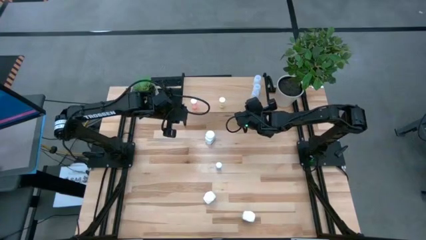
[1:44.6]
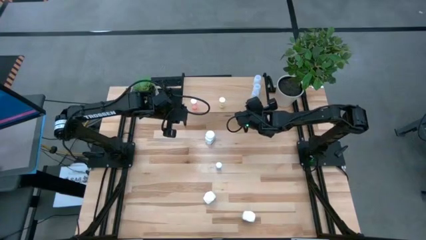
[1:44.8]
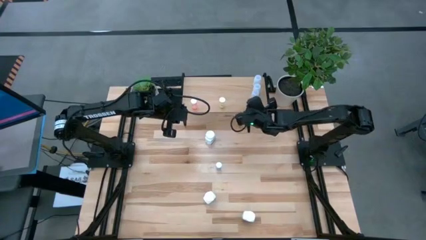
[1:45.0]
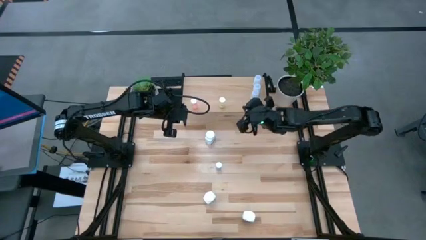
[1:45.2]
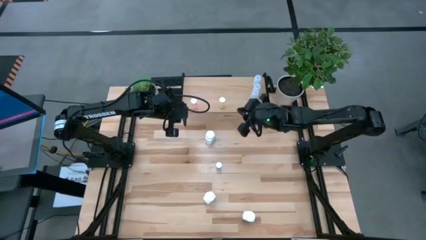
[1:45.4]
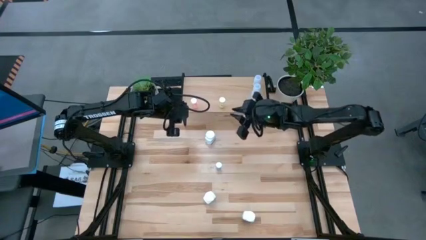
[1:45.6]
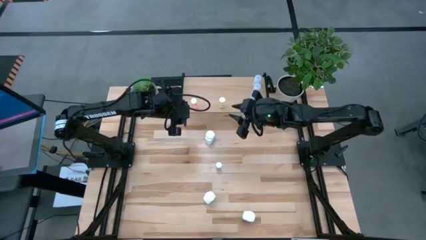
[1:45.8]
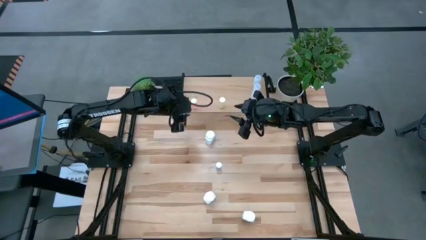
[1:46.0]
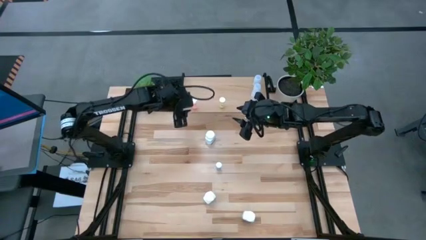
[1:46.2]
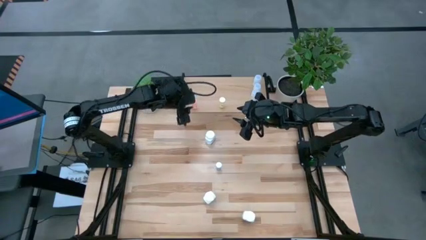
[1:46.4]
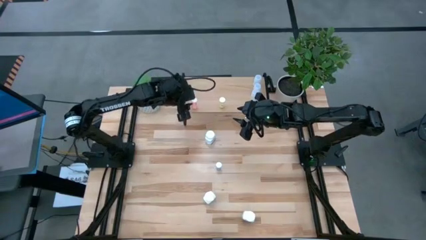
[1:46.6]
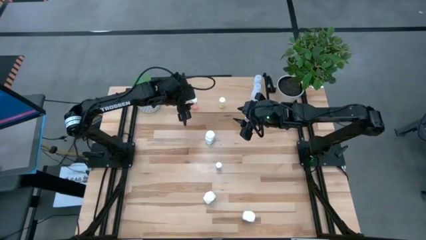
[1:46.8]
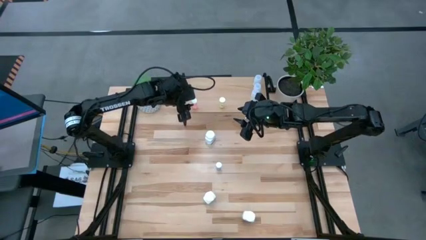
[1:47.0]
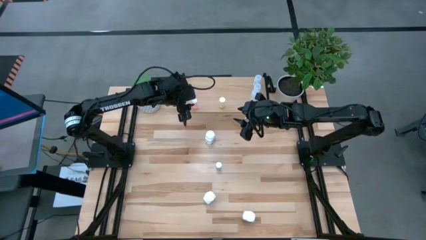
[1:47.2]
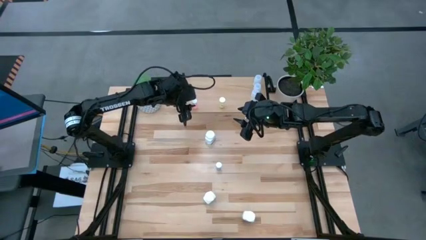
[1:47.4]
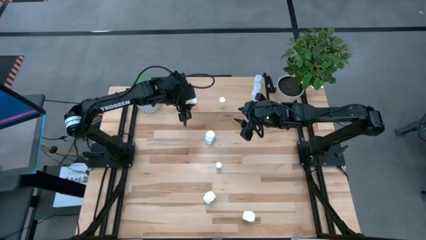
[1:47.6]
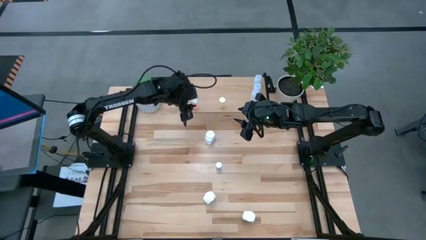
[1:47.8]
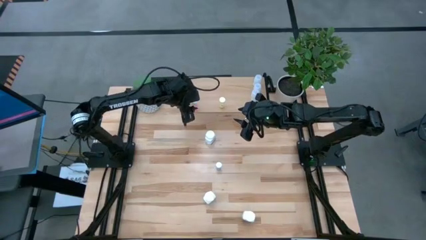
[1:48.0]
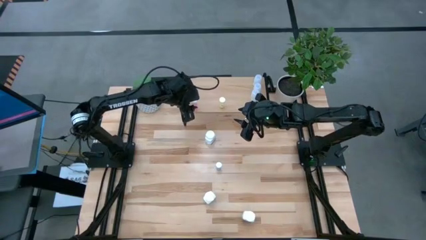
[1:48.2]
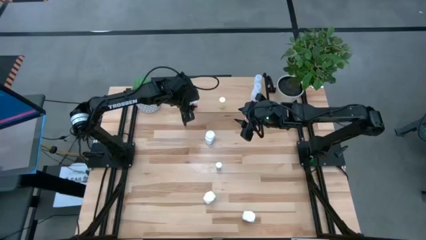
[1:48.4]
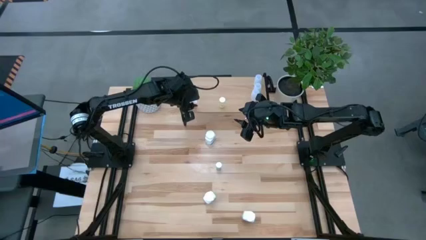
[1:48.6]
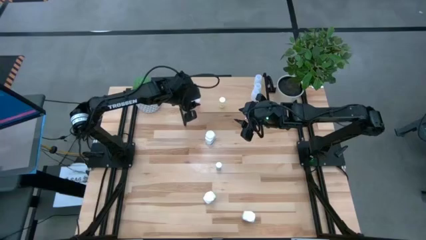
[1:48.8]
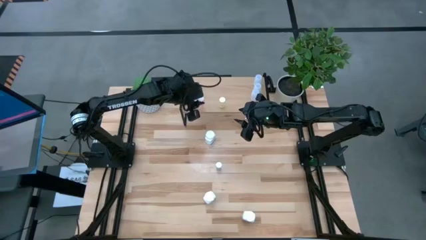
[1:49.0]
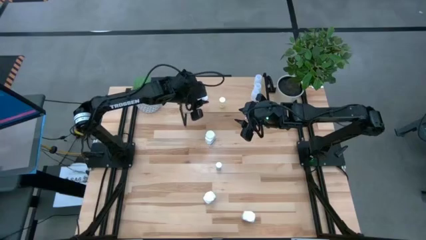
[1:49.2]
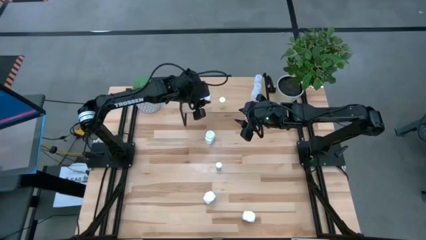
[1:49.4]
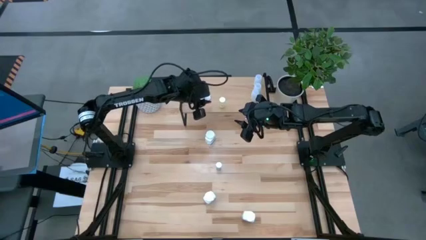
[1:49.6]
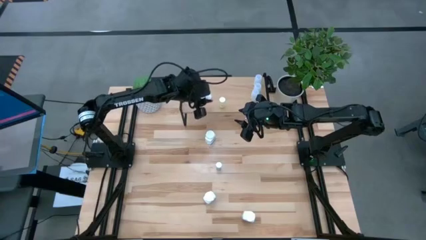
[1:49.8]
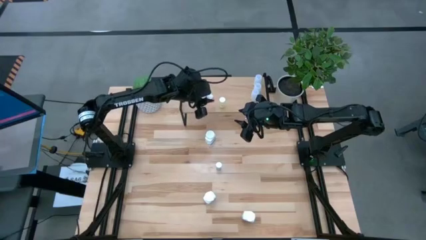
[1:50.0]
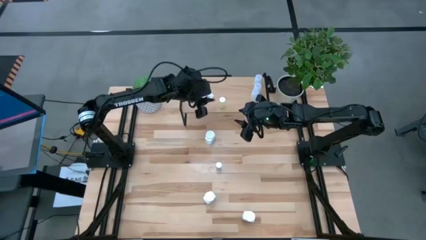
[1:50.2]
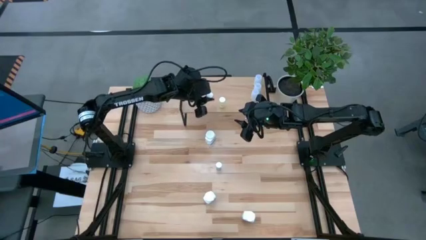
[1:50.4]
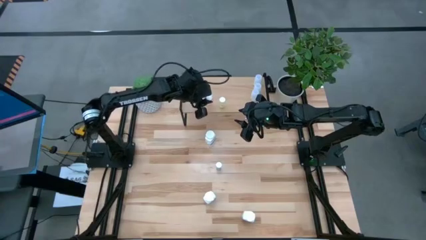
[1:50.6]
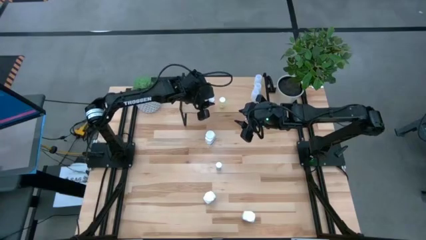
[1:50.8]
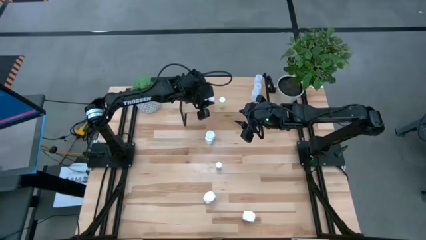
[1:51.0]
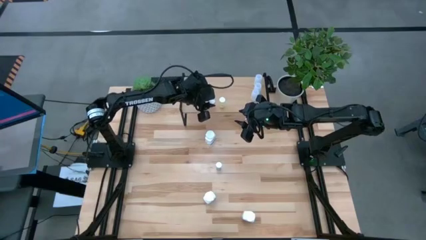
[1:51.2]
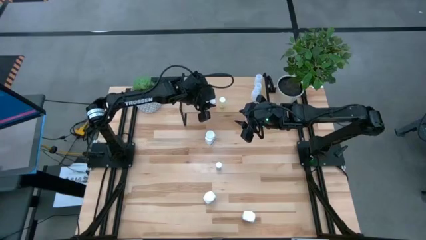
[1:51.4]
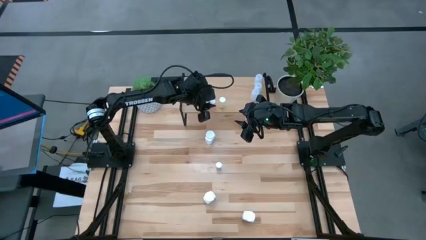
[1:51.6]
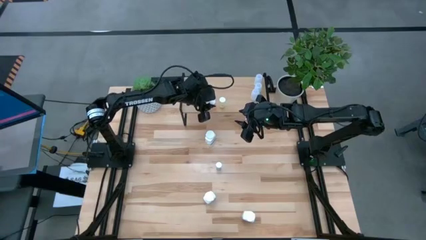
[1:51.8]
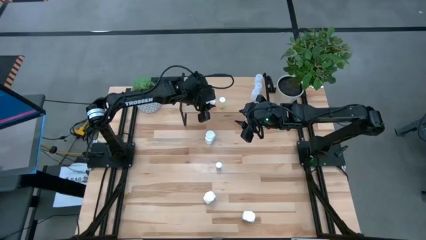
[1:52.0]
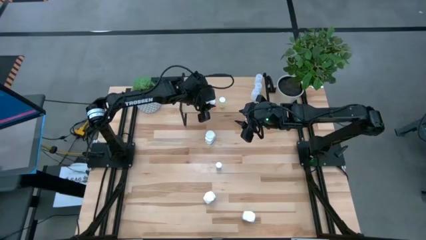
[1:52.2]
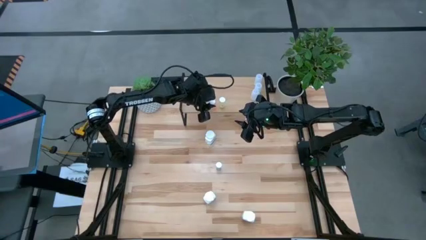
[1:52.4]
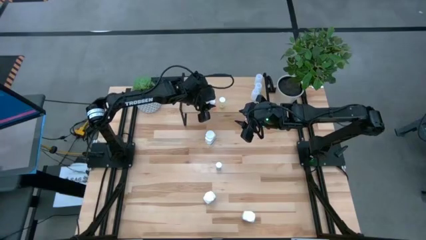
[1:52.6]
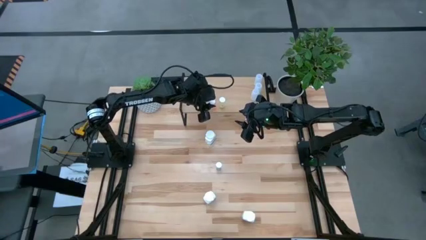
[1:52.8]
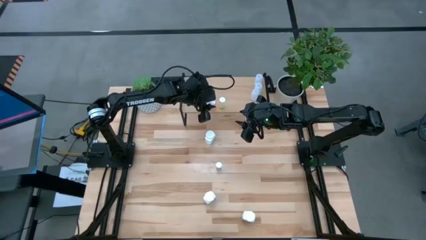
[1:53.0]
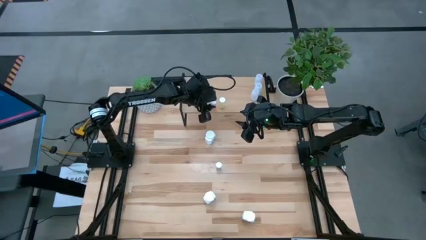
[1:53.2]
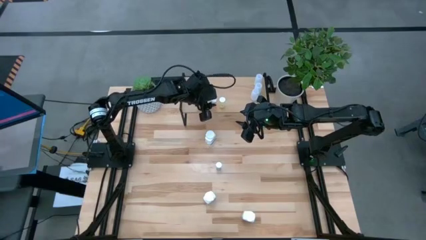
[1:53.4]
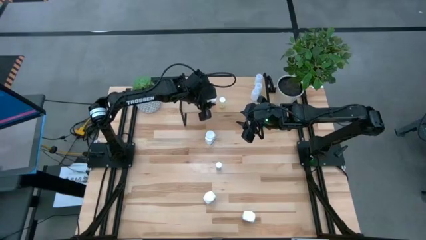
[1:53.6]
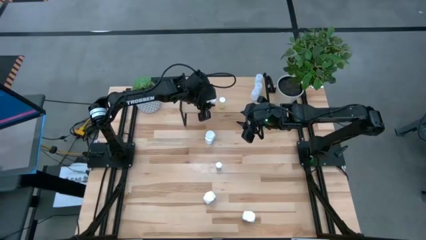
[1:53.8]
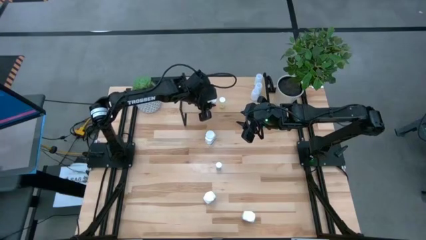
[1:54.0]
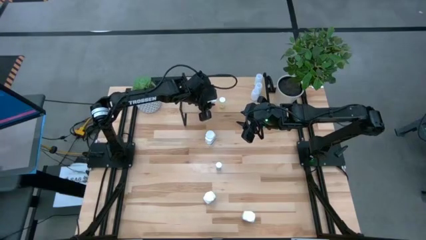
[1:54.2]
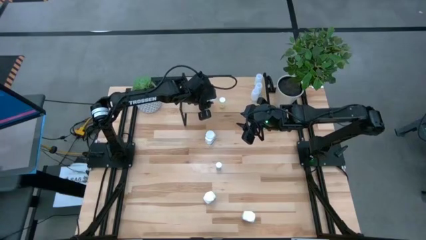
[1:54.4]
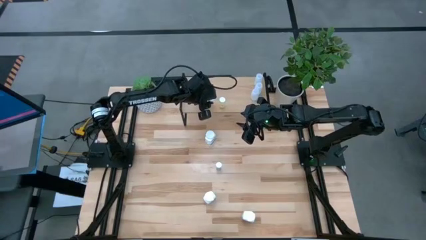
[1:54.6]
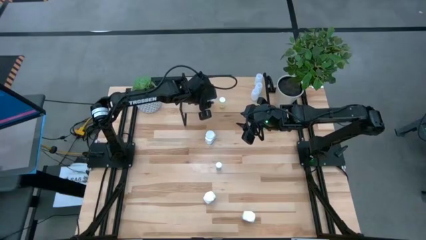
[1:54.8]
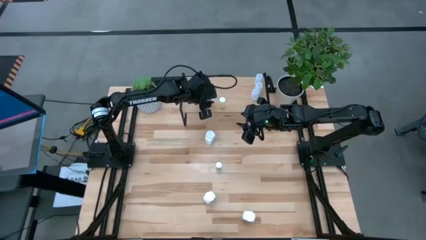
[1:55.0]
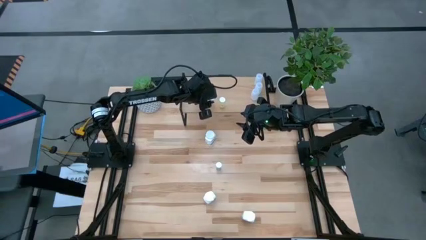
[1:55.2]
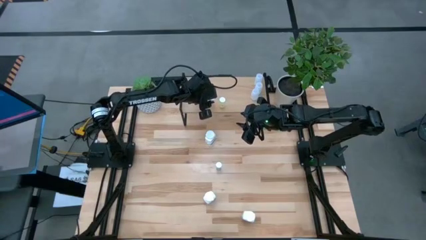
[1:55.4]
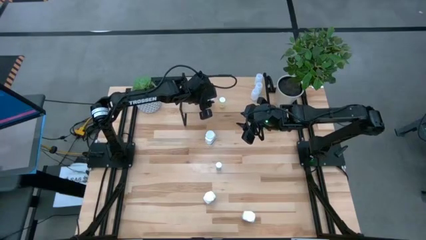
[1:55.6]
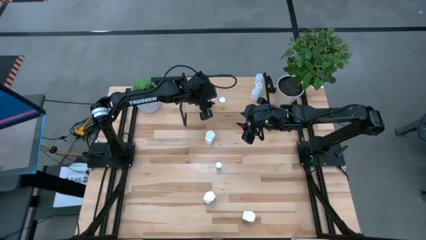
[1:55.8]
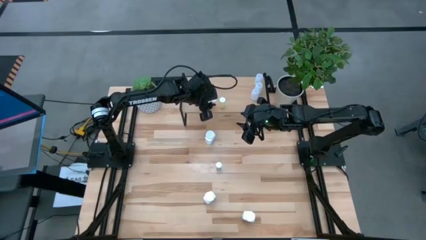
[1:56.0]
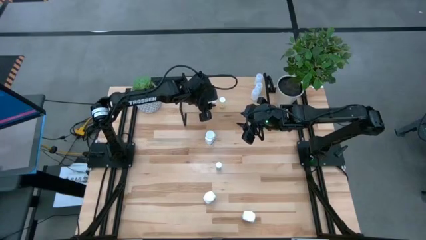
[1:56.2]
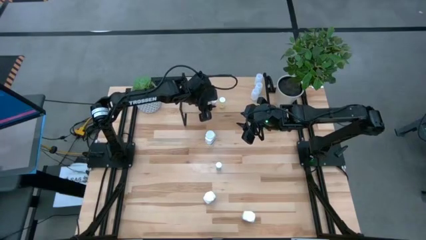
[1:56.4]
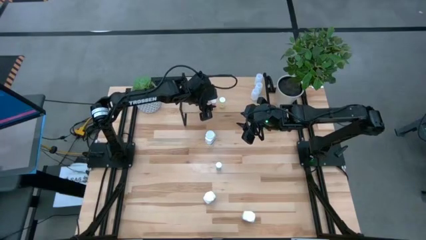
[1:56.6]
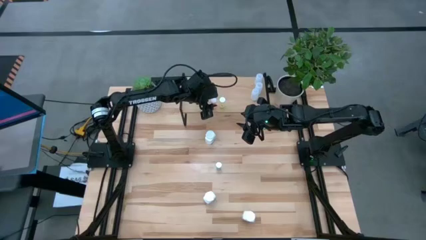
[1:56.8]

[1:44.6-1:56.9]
Task: Pick and place medicine bottles onto shelf by color
Put the orange pill on the shelf

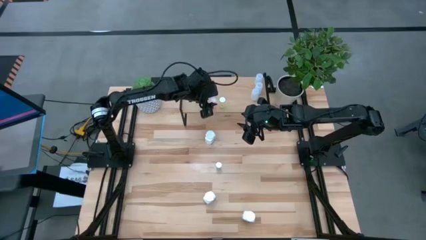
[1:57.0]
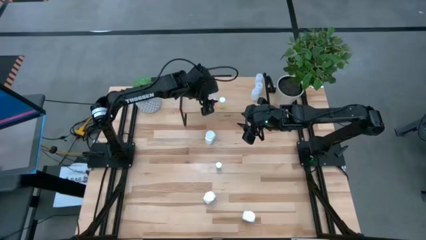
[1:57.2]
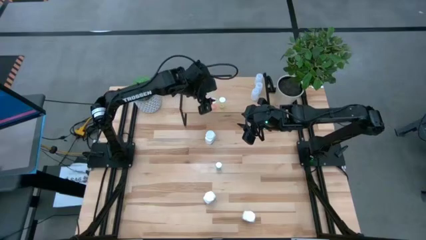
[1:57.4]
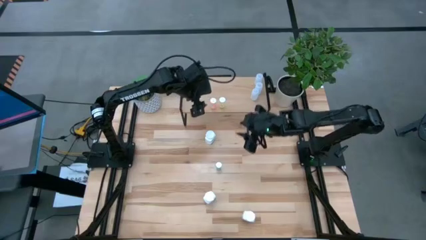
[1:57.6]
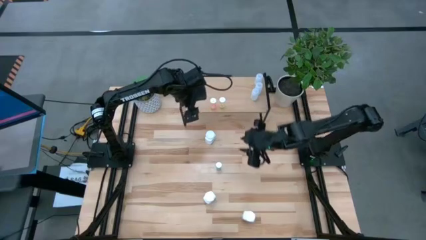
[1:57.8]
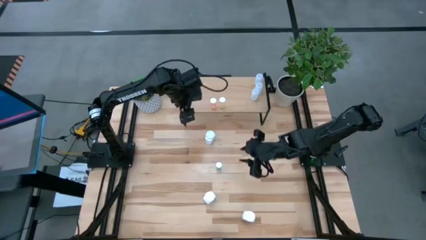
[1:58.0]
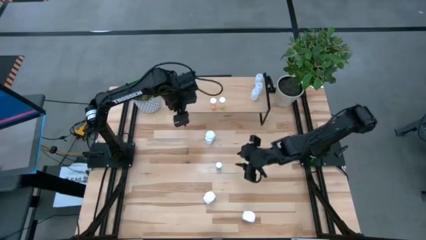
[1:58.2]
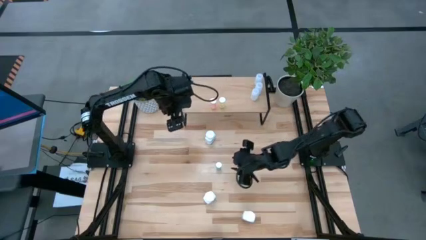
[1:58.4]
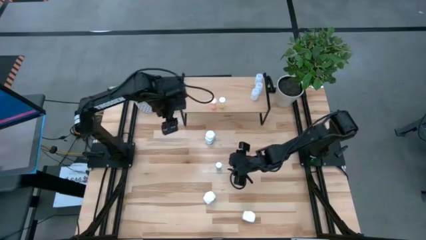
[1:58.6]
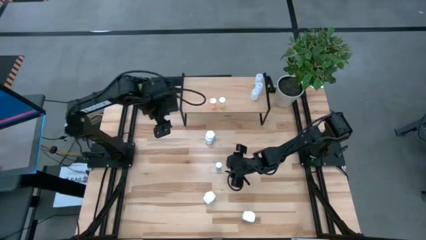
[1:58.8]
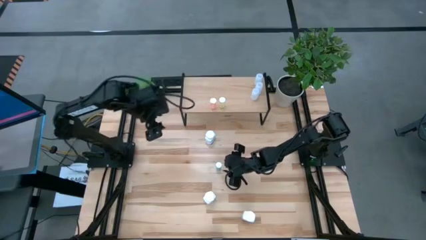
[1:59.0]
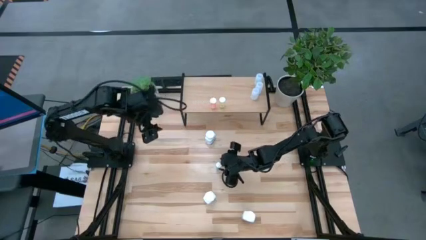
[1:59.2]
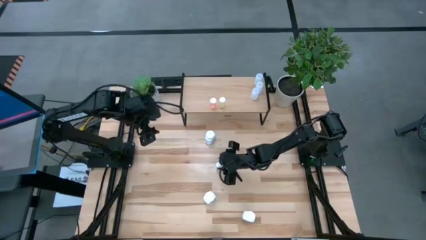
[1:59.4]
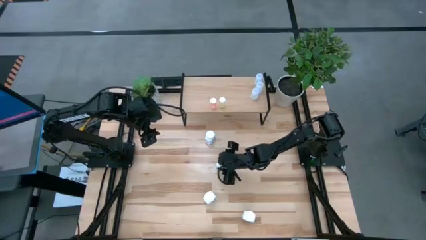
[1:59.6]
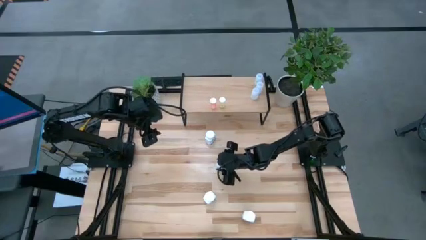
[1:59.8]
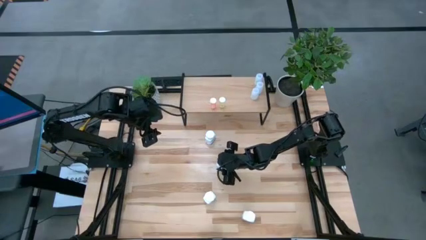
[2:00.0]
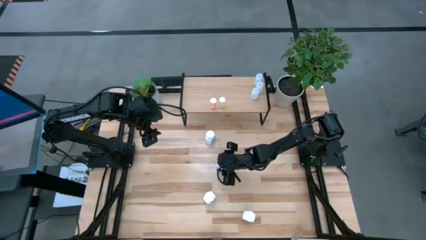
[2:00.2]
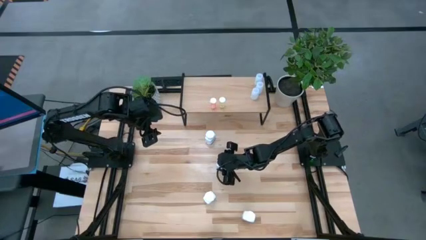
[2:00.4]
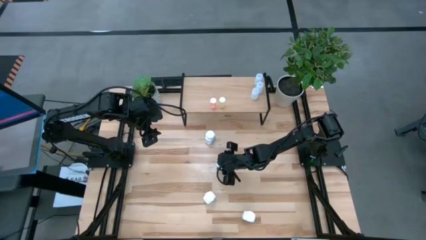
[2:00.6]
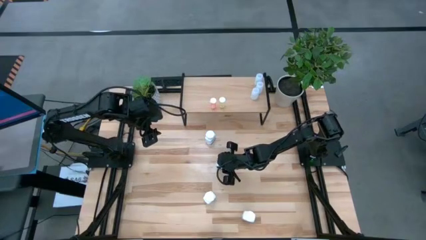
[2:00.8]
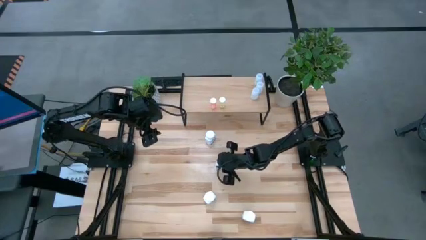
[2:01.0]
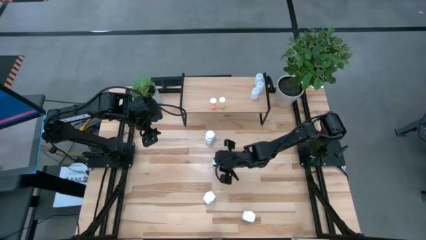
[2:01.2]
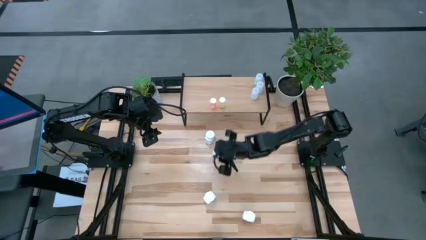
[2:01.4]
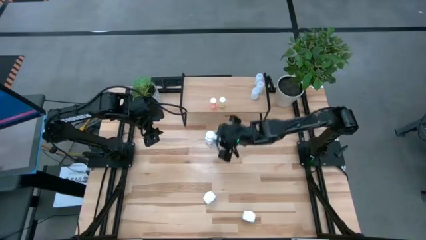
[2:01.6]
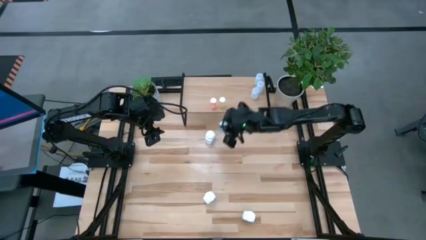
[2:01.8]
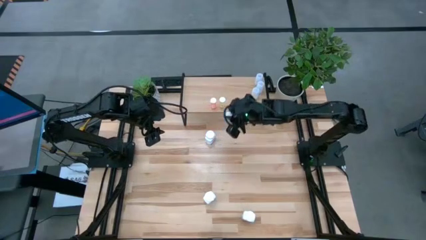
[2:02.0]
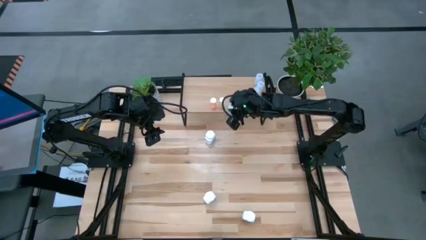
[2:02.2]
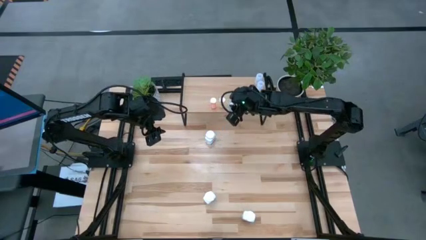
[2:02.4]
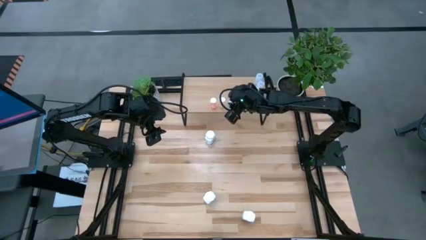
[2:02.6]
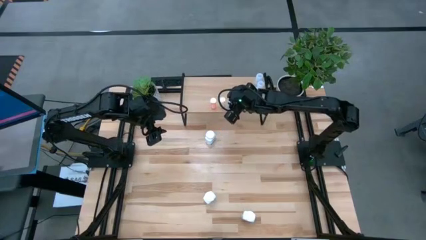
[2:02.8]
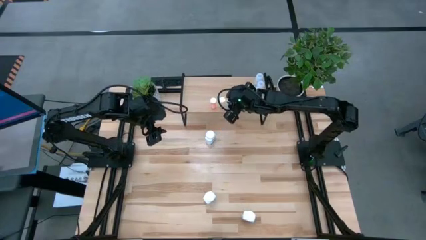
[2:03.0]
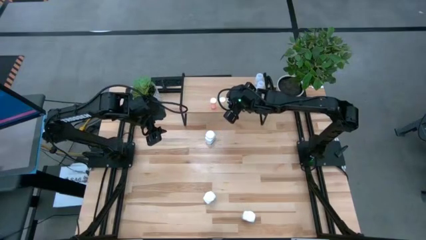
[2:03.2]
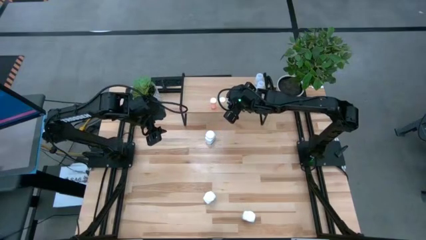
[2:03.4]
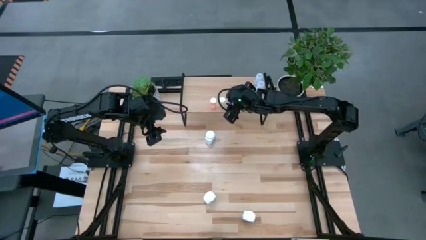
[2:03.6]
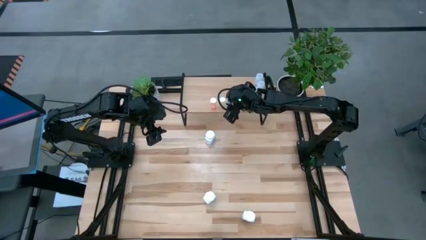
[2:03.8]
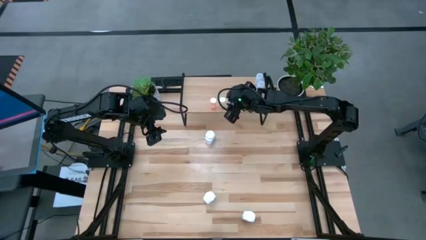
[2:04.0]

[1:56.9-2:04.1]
Put the blue pill on the shelf
